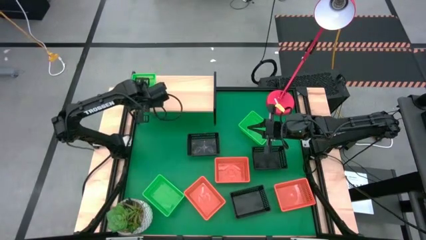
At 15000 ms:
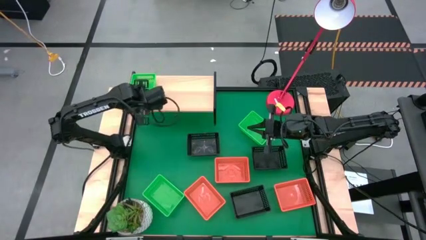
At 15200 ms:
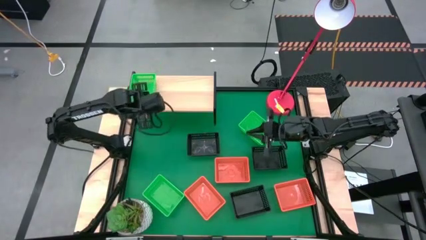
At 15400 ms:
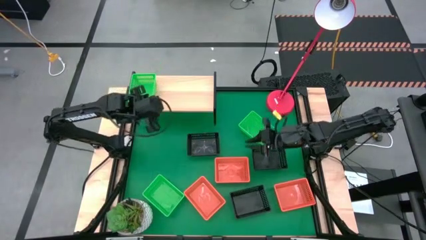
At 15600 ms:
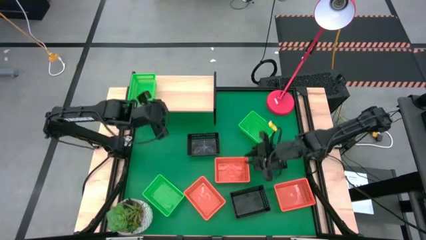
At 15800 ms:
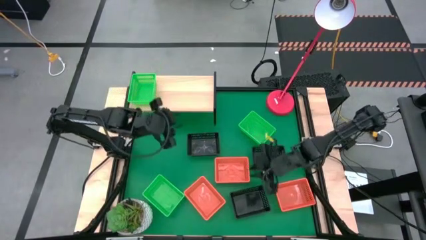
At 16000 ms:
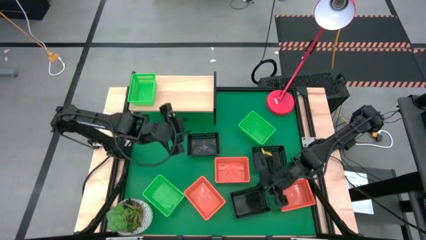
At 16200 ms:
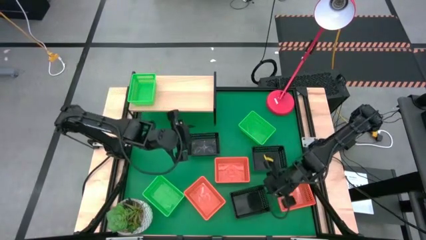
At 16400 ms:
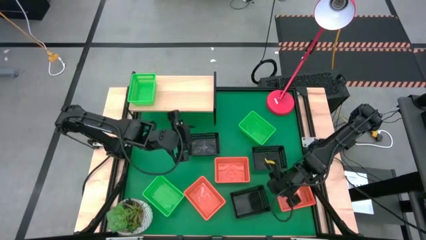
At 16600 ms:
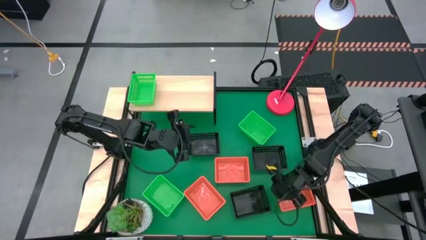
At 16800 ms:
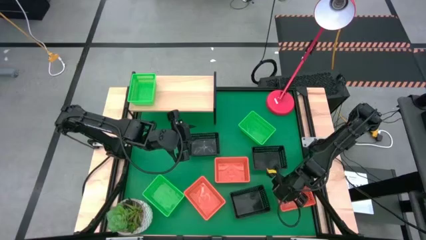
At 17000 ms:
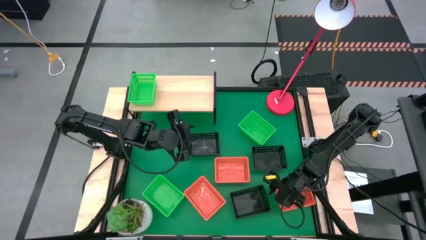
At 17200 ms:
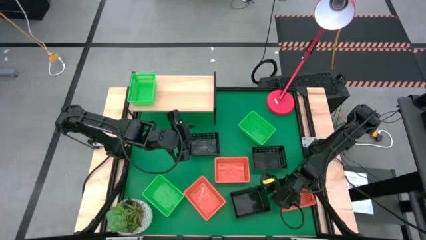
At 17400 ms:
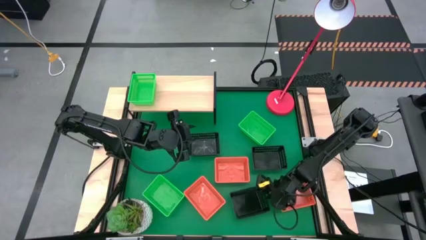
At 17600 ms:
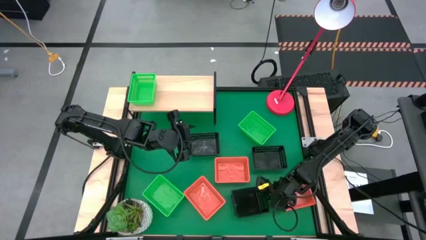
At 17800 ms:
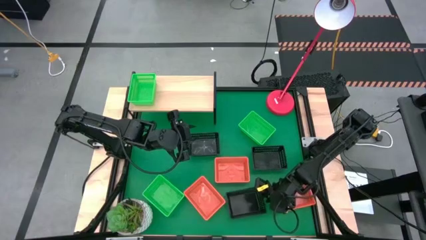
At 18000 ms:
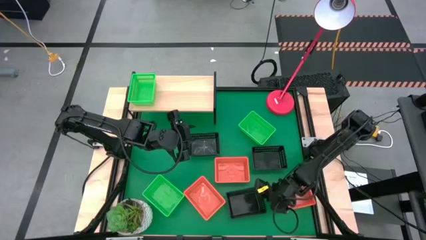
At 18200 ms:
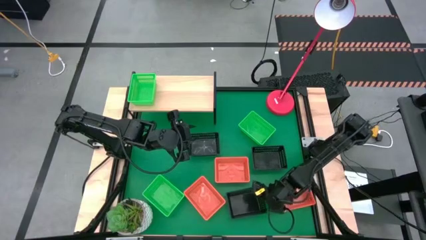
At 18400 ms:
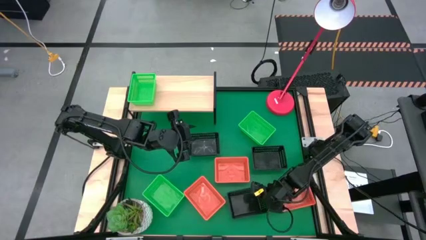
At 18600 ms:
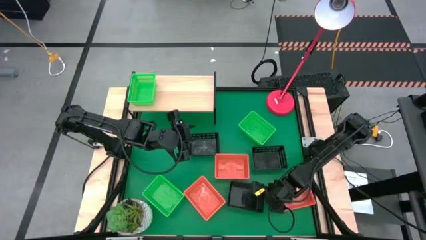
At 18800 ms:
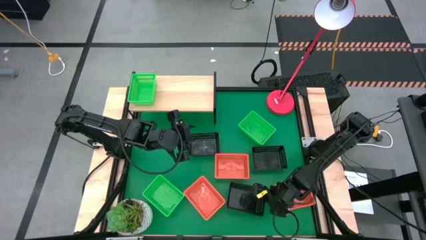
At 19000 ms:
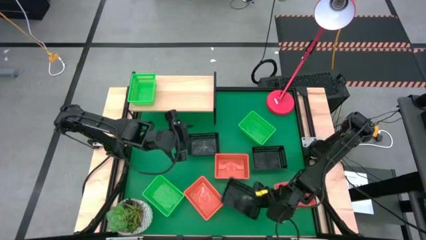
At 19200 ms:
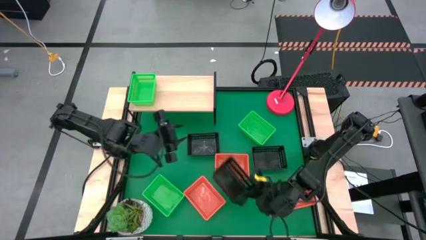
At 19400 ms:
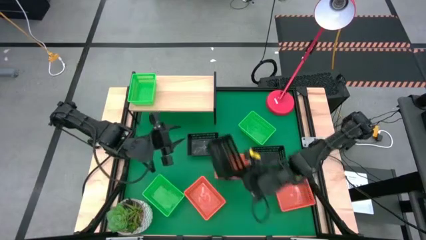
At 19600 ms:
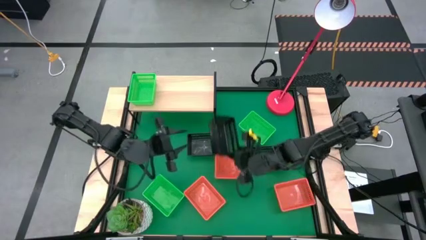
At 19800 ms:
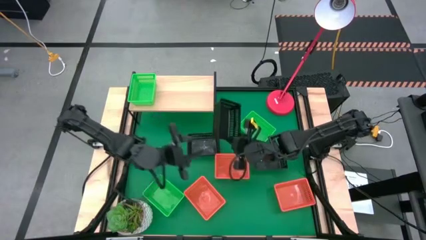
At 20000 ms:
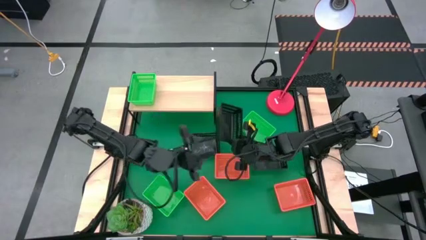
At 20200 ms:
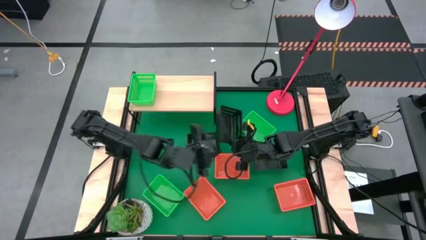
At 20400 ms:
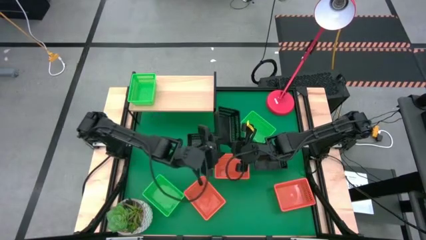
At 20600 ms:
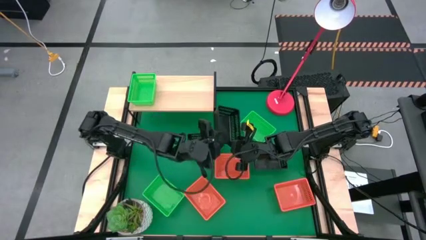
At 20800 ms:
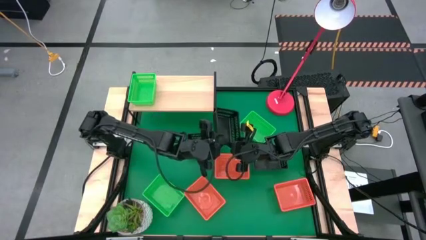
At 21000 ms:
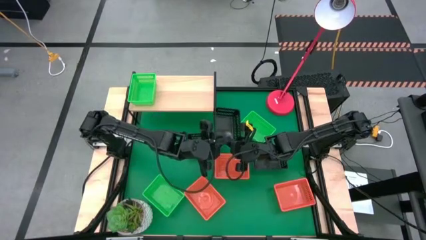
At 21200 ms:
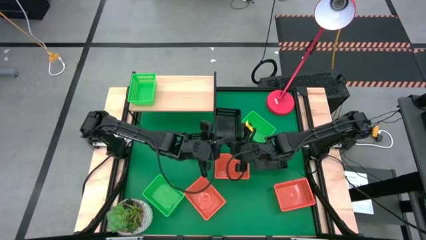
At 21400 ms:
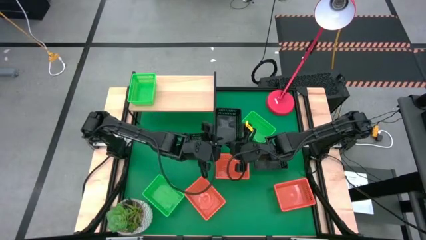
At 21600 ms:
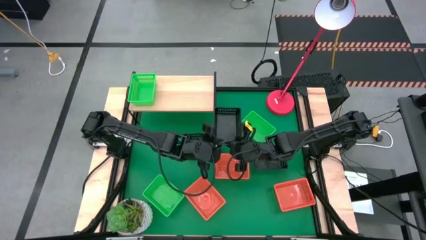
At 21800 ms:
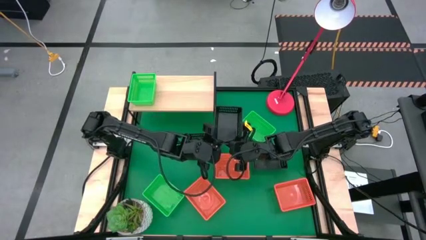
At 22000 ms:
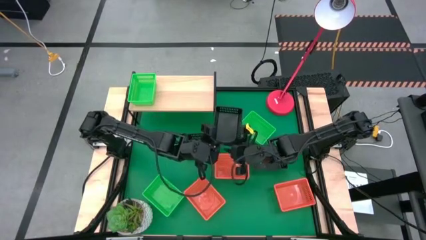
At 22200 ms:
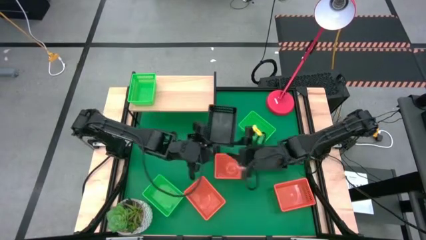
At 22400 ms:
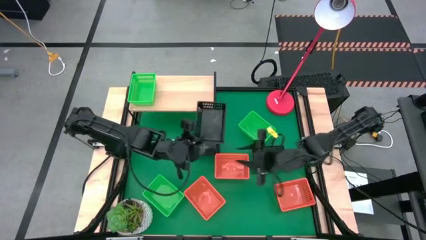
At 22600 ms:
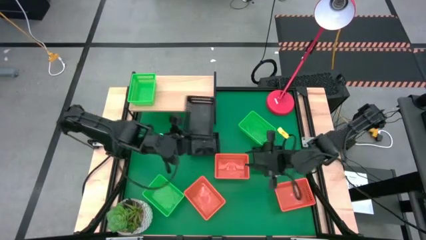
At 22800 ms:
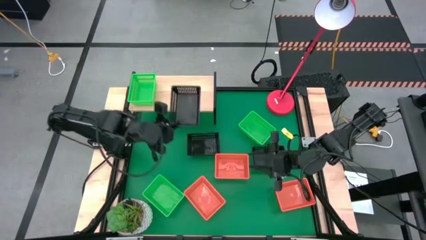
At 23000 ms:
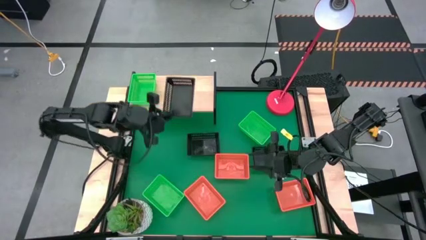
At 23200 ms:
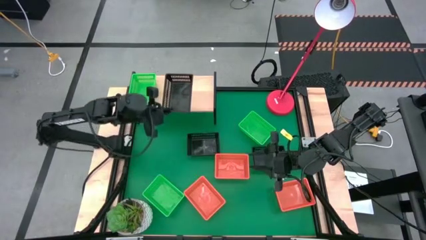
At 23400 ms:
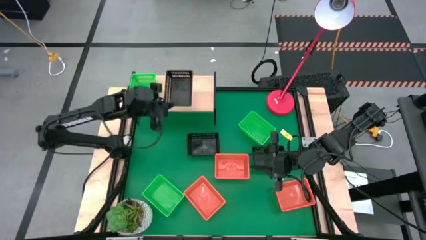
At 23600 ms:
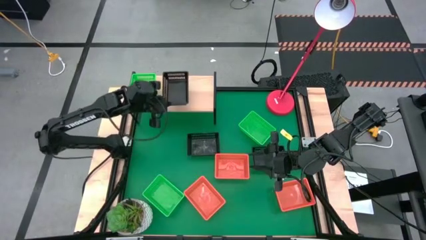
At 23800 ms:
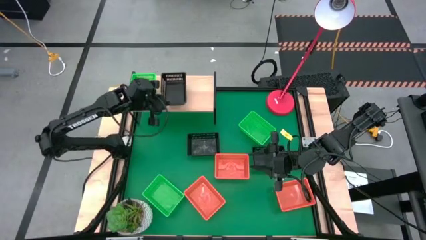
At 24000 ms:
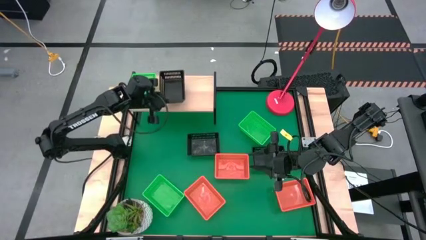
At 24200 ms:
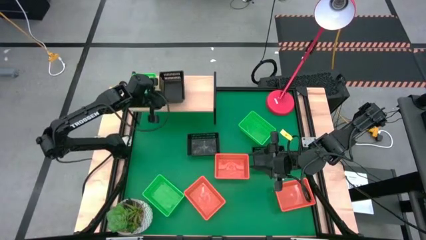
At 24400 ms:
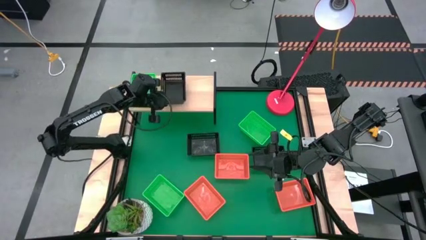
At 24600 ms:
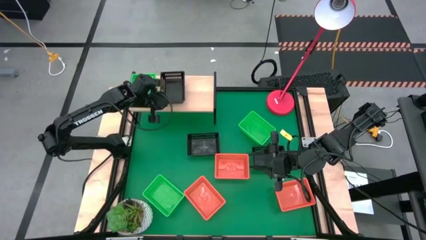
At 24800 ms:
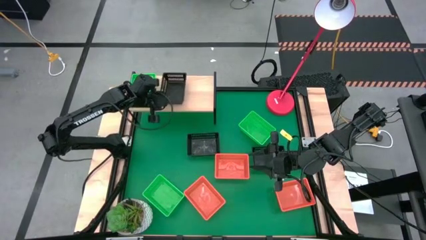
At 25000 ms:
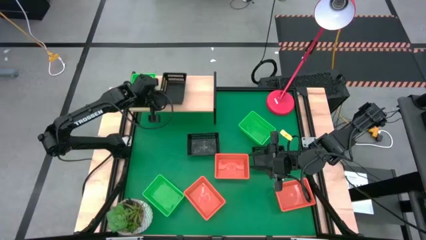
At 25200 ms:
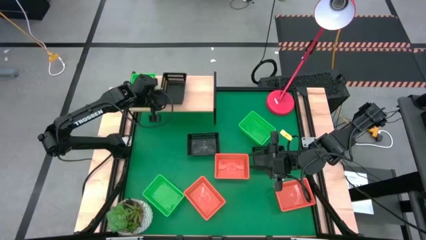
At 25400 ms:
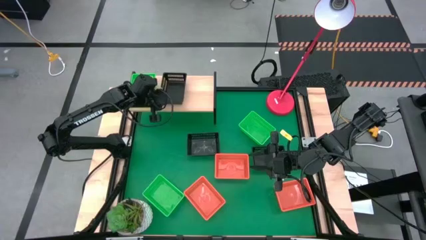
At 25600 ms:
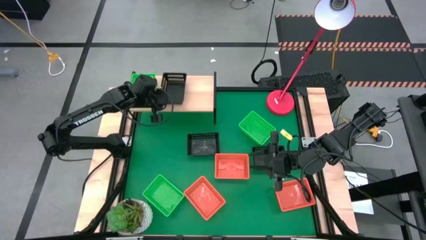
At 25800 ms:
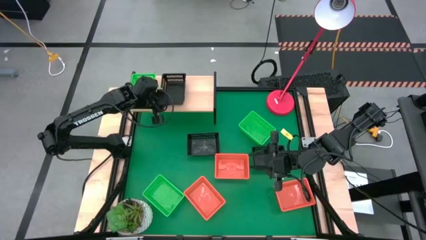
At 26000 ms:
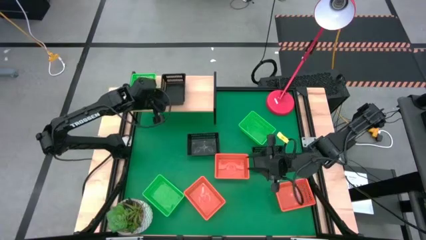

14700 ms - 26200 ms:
Task: Stack baskets on shelf by color
Put the bottom black basket on the shelf

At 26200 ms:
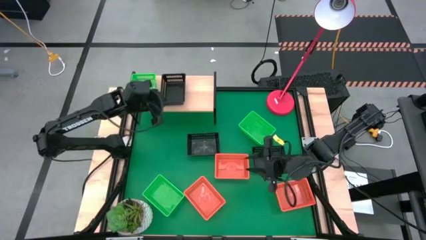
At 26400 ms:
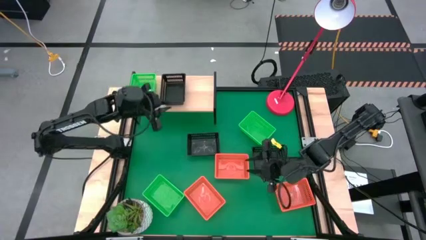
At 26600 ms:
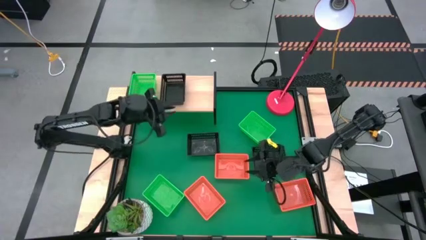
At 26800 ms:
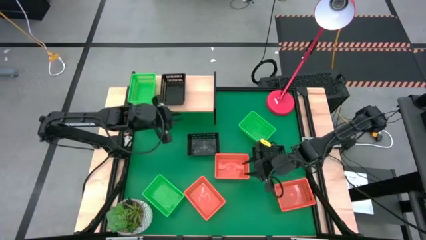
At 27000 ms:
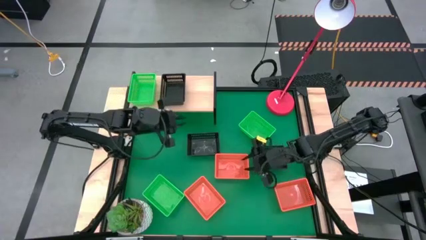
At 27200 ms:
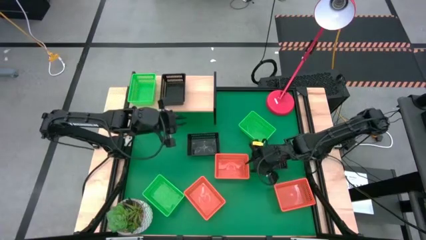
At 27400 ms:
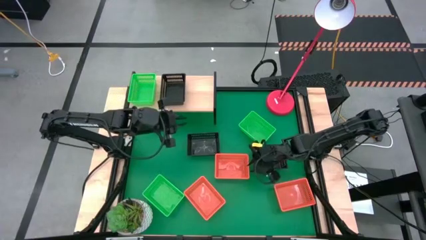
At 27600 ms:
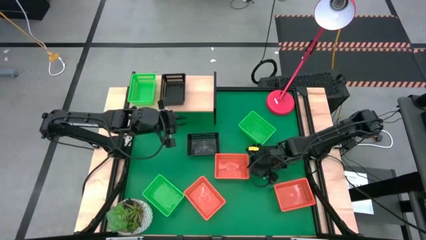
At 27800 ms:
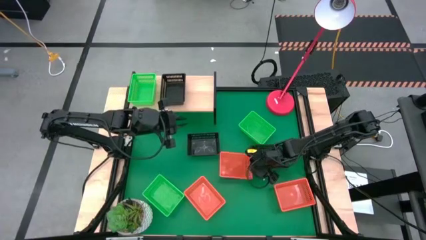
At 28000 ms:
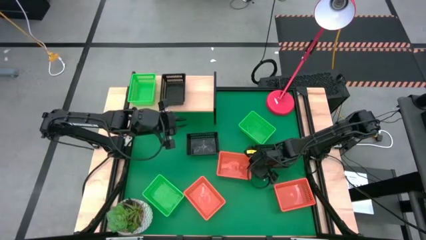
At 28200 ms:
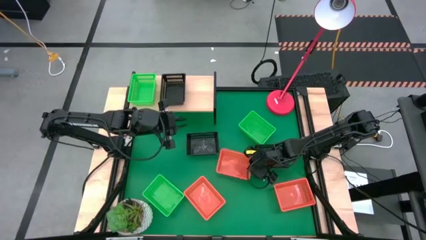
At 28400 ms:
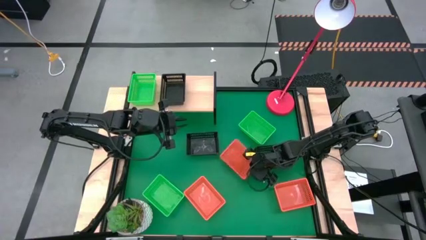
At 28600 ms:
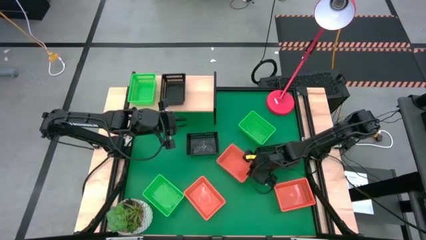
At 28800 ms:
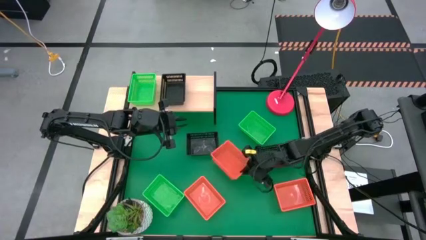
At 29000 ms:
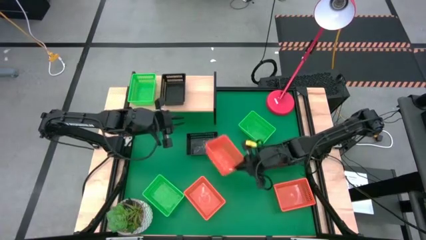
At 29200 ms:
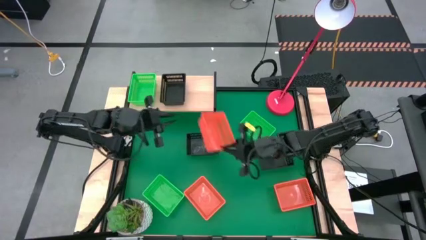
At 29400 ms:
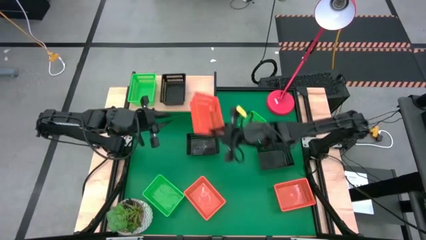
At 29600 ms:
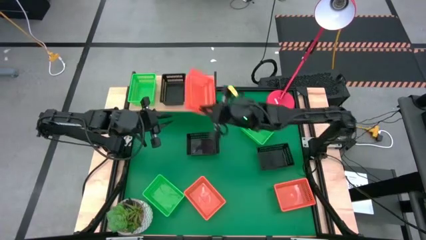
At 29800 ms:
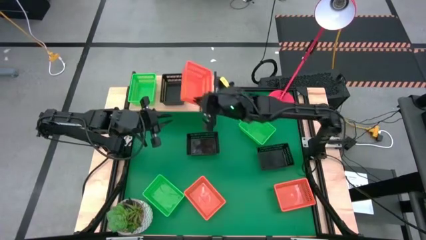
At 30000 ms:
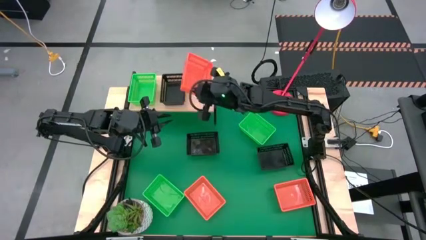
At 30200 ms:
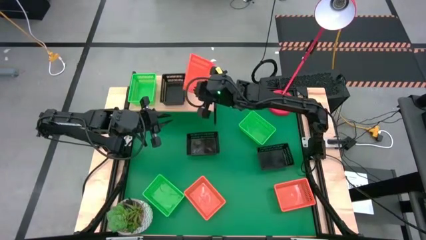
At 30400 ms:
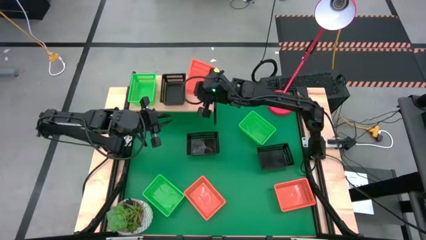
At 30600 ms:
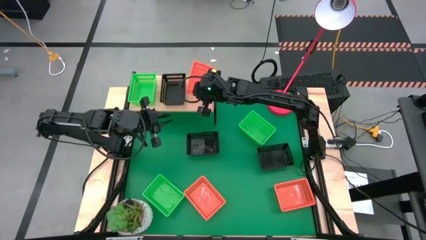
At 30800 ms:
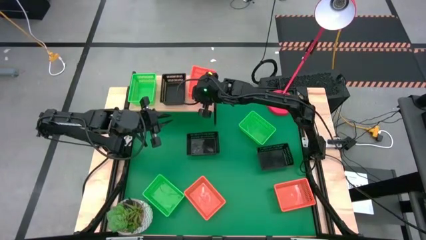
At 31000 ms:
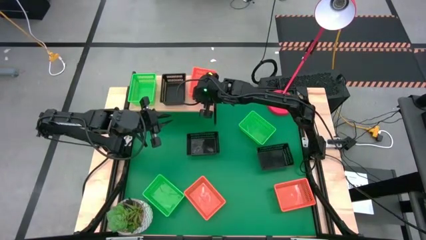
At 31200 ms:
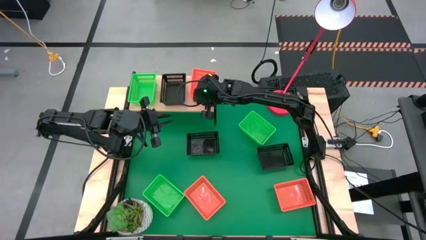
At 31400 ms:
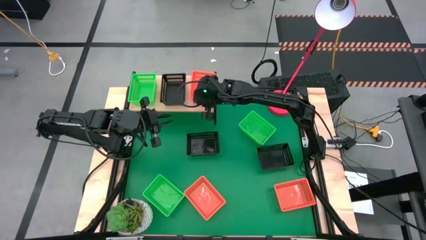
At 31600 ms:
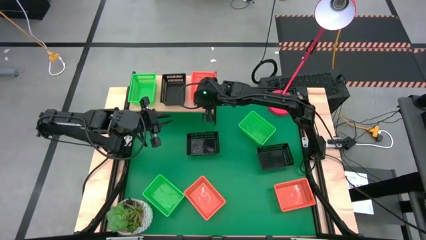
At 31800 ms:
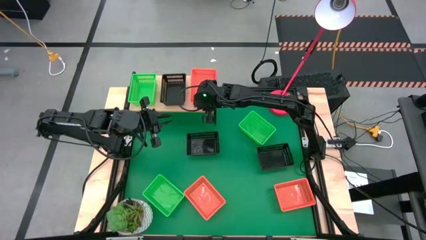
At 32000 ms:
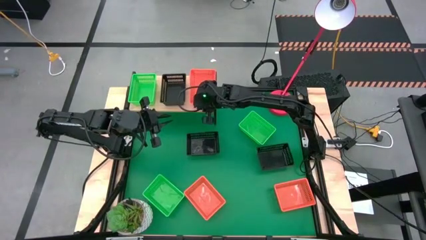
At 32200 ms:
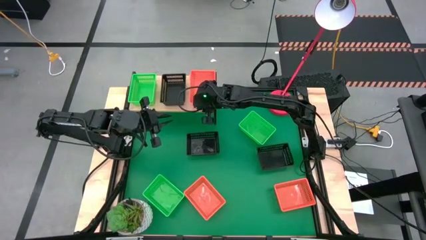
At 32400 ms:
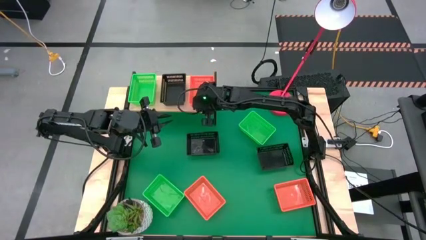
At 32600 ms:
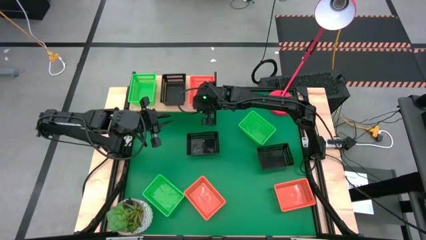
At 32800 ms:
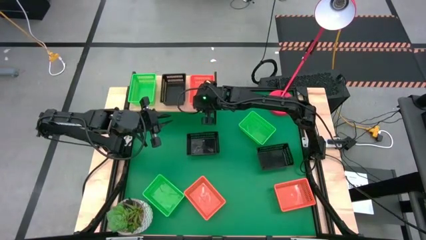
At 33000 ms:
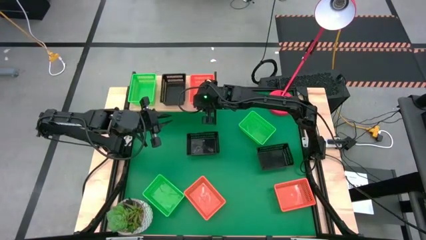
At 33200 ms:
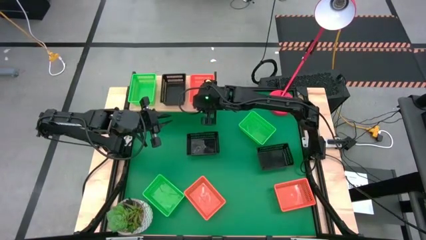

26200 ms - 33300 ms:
Put the middle orange basket on the shelf
